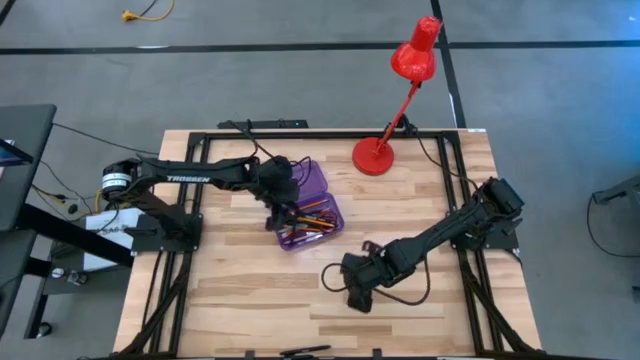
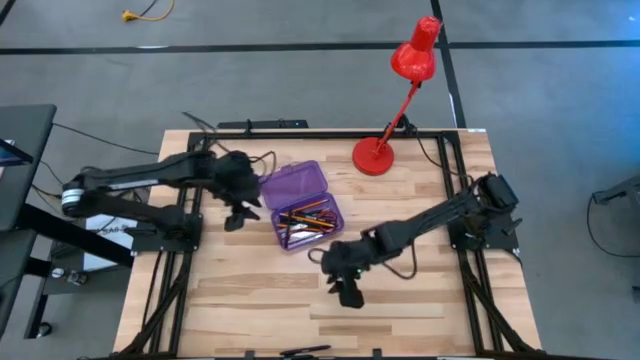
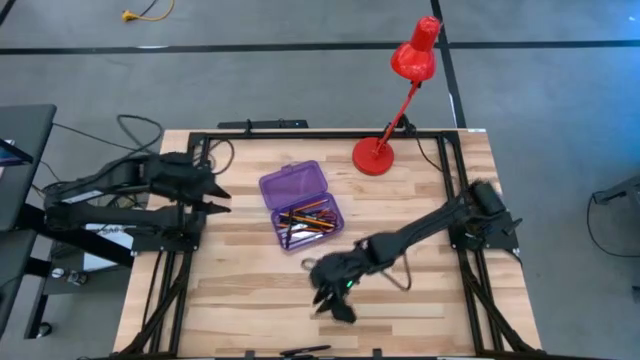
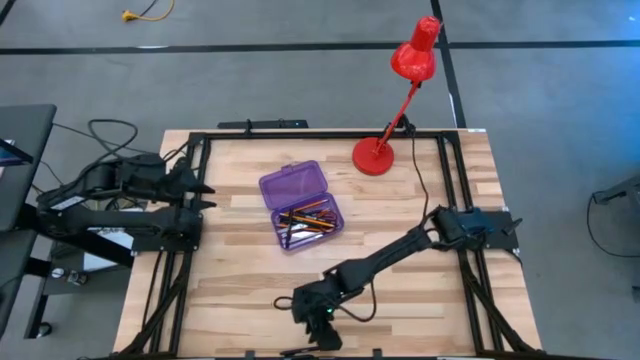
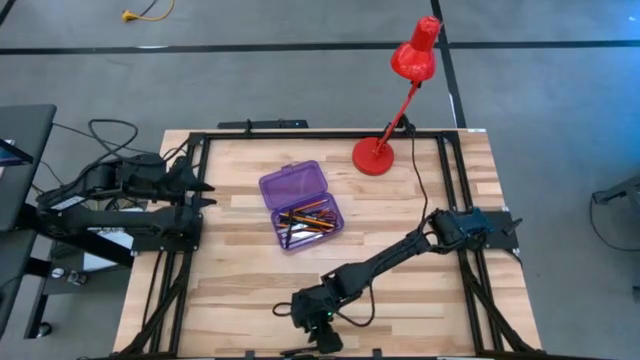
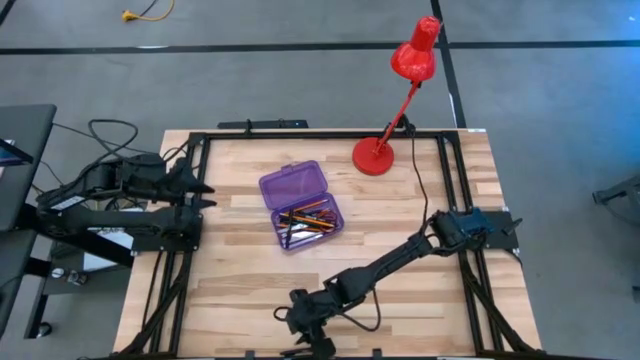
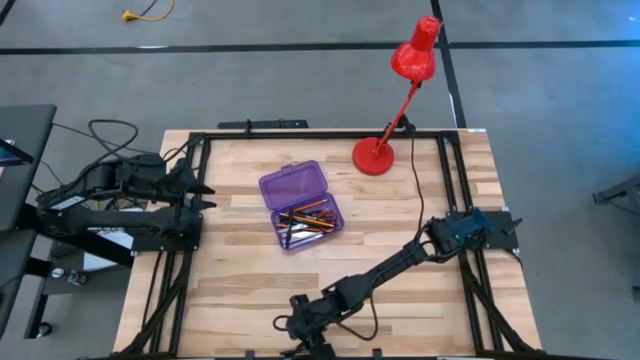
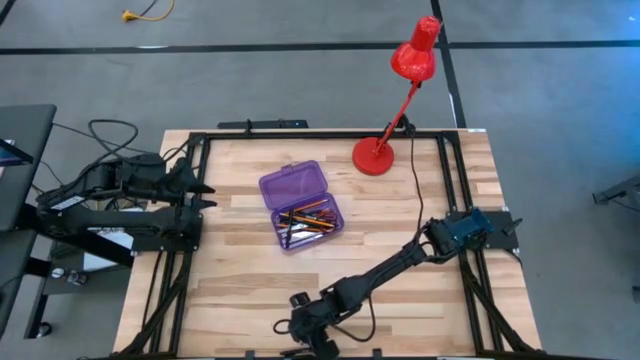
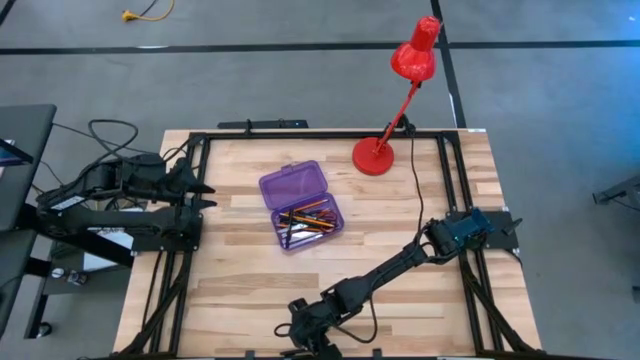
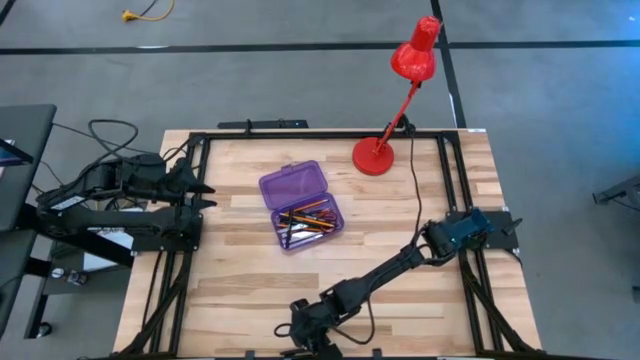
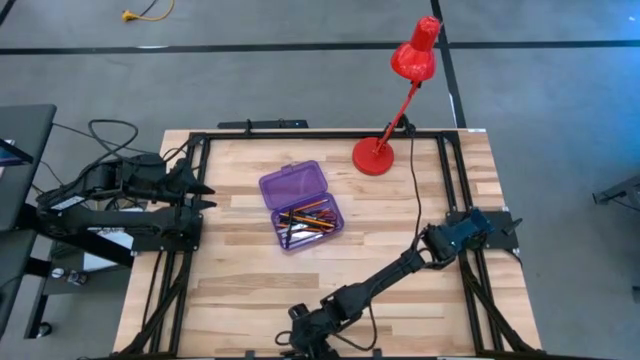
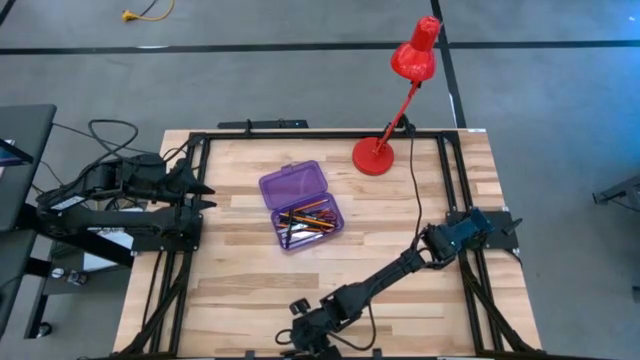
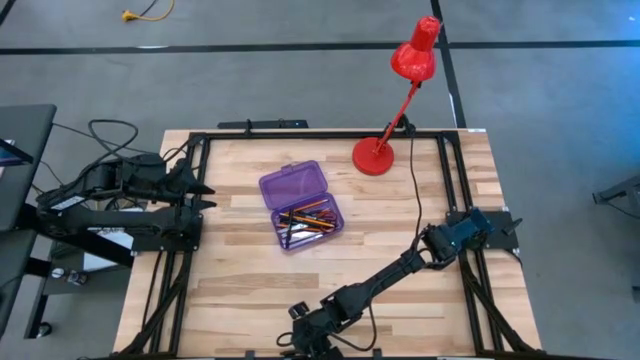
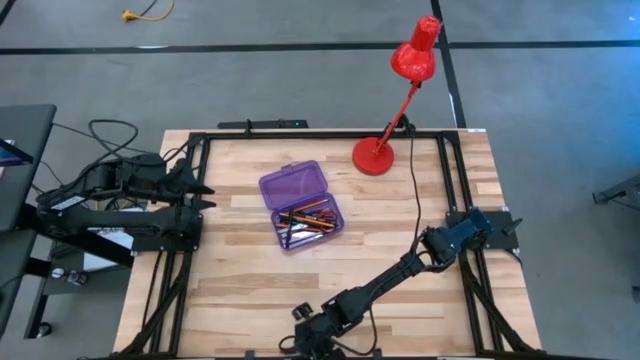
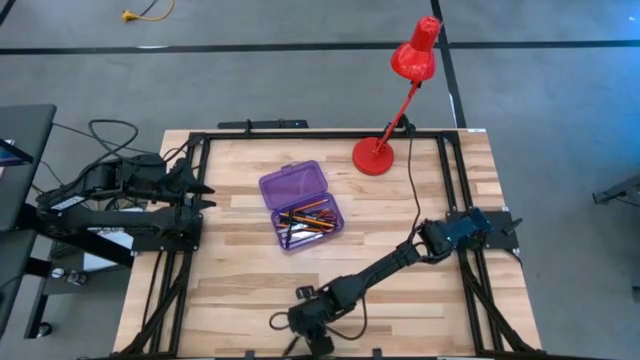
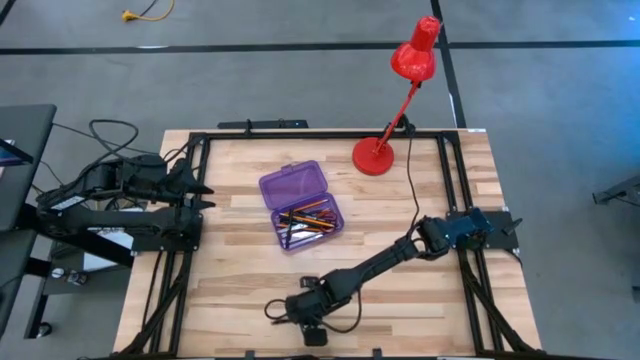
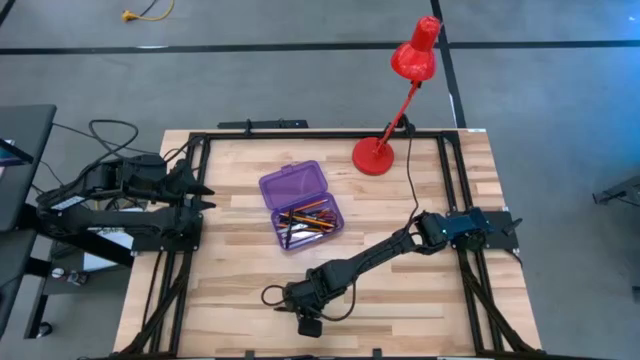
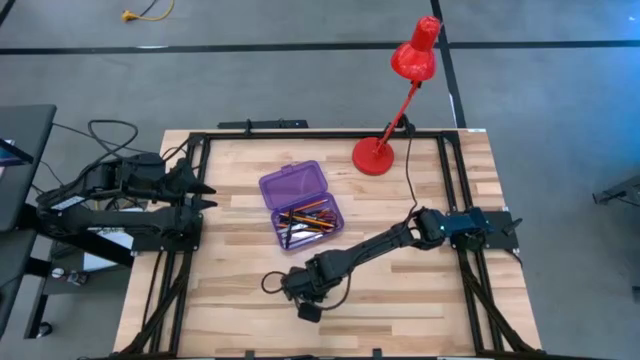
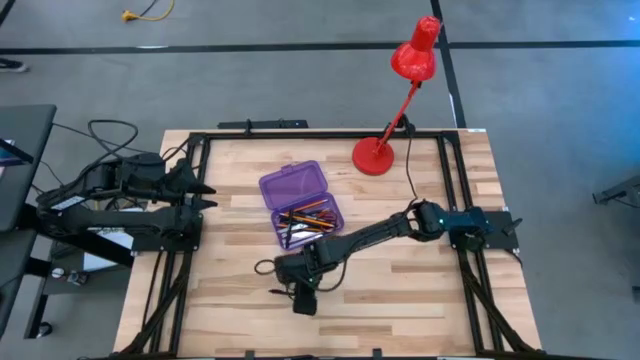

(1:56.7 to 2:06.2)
Task: Pick & place school supplies into a supply box
Put the black pen into the purple supply box

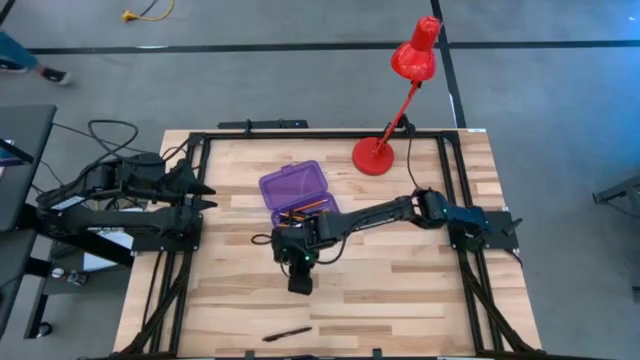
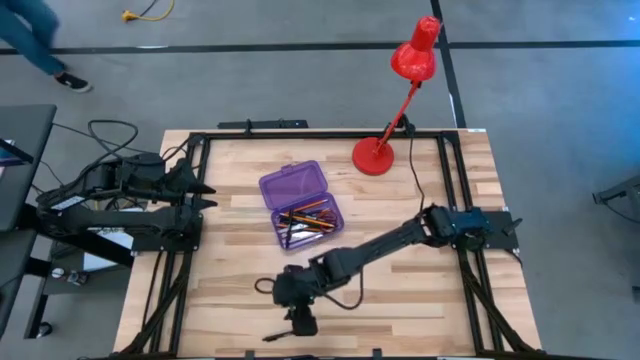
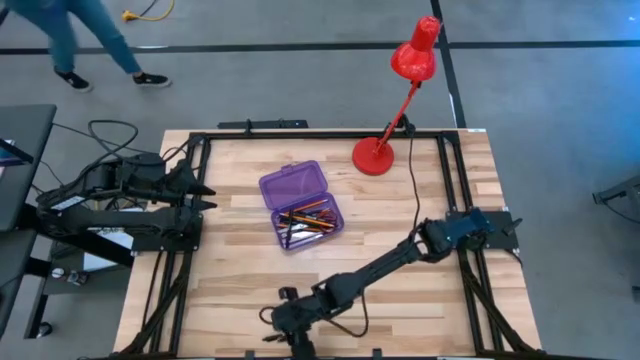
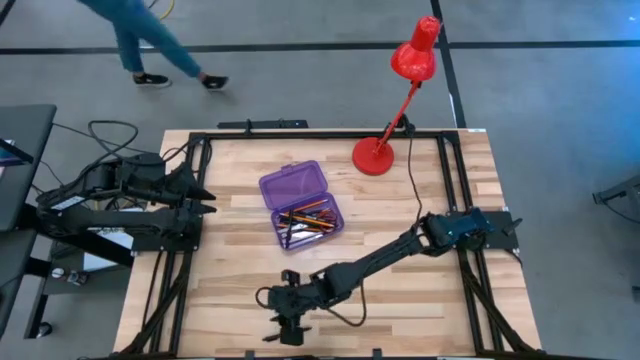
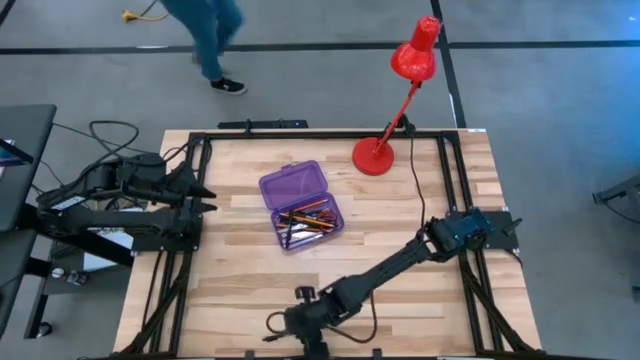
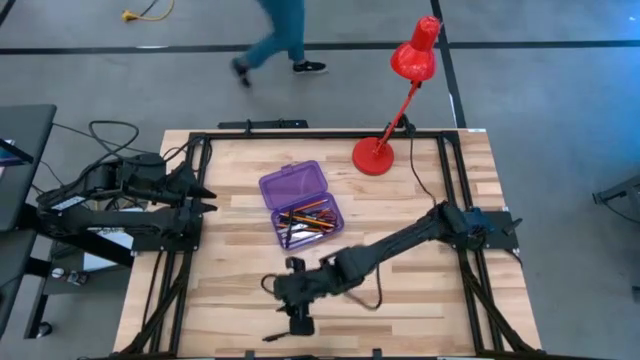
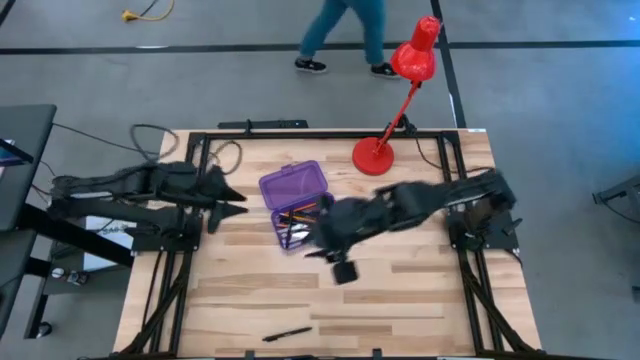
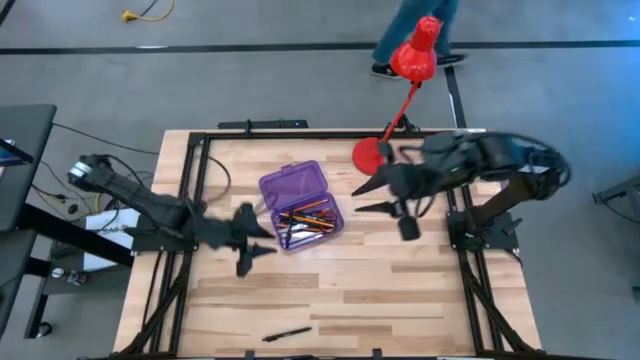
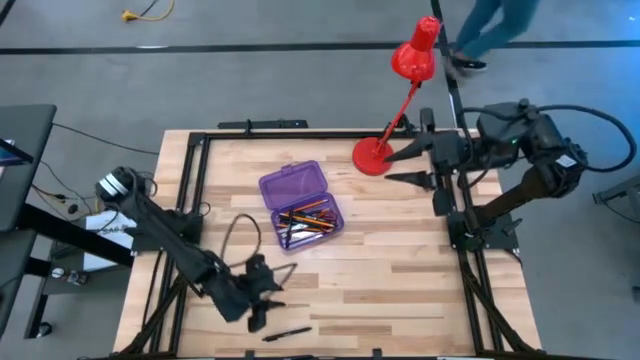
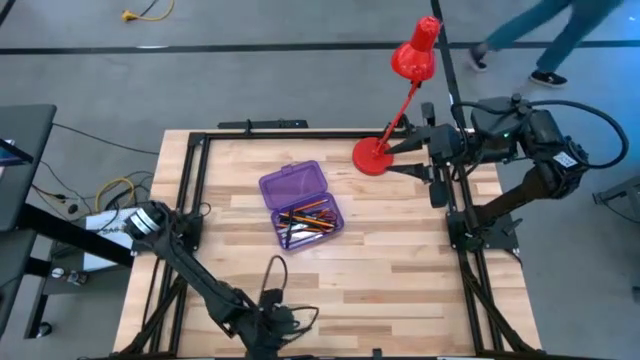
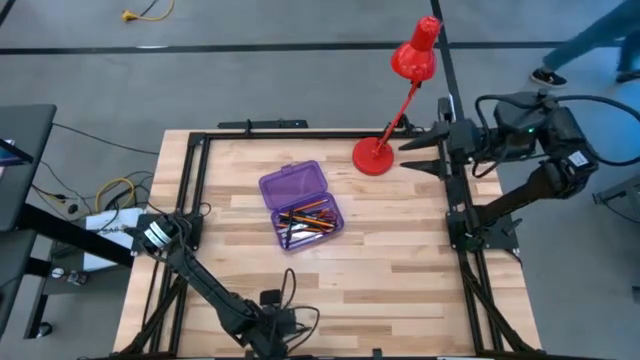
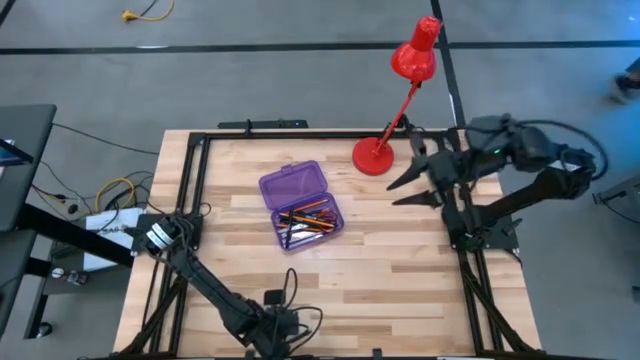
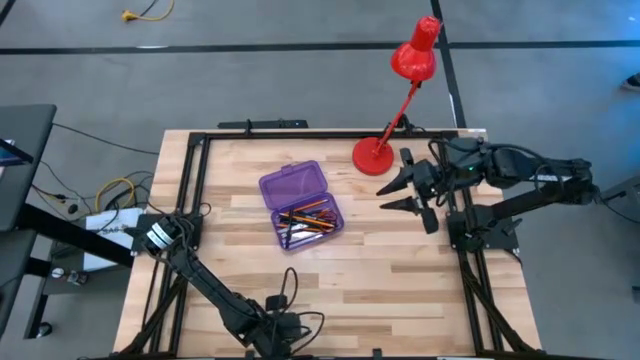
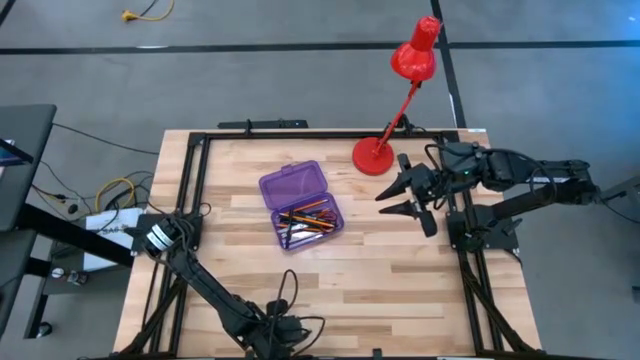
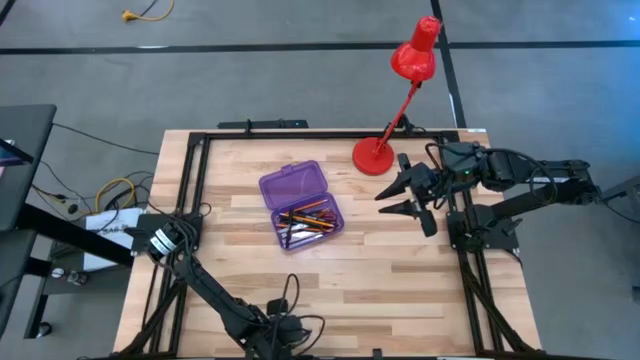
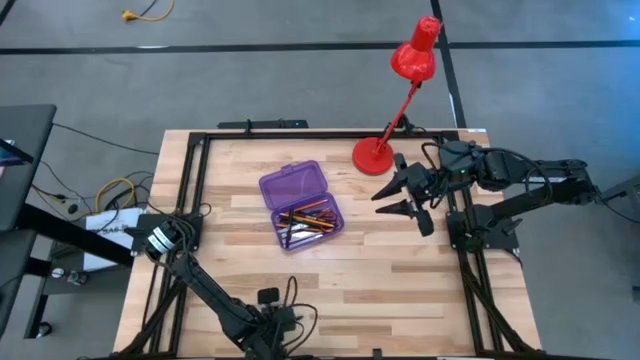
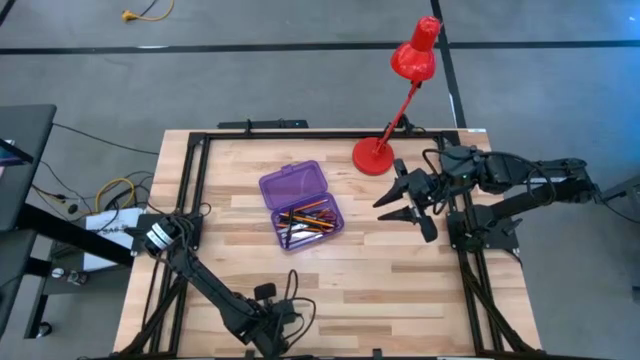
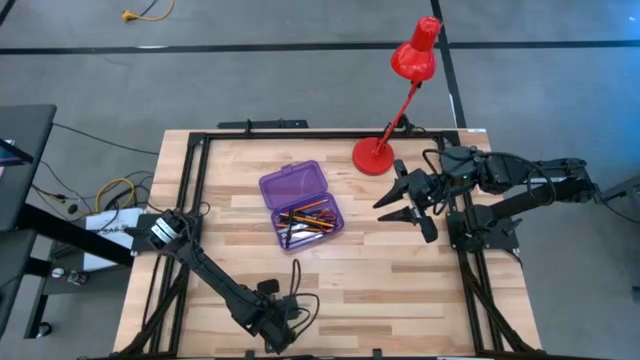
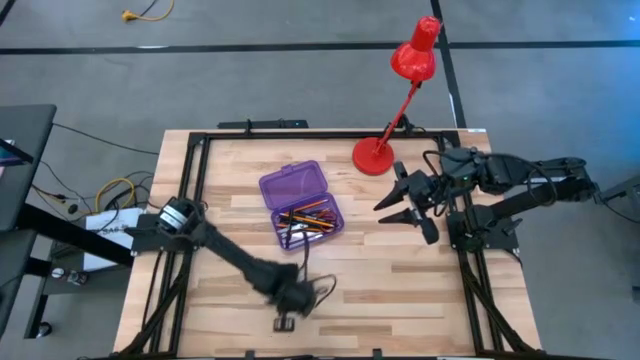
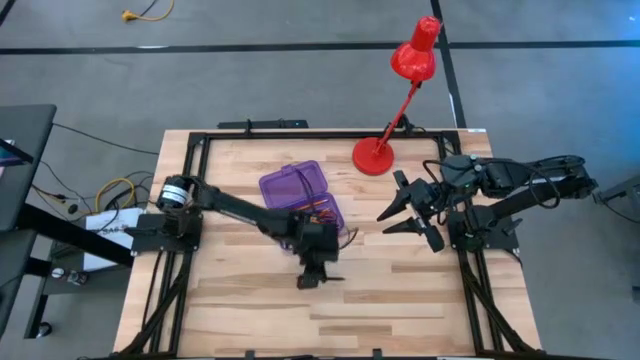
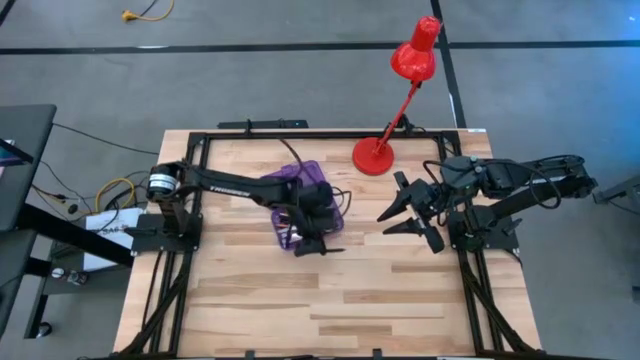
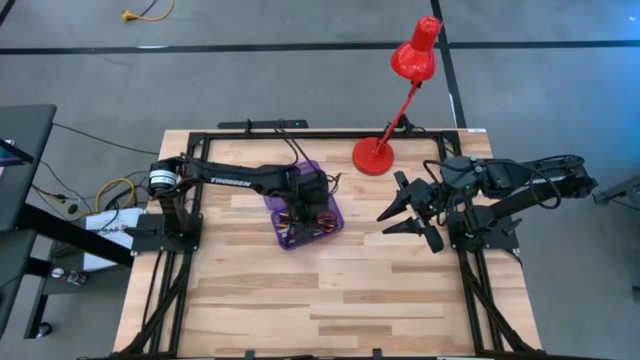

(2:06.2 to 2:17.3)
Put the black pen into the purple supply box

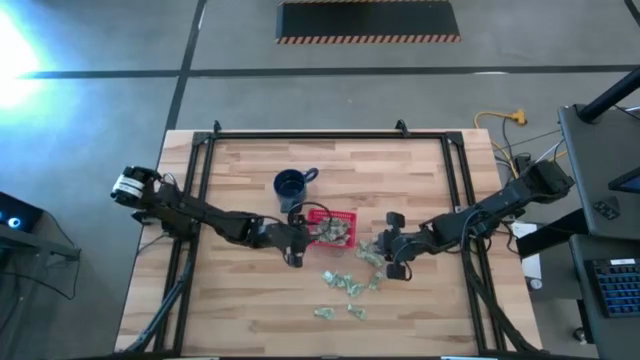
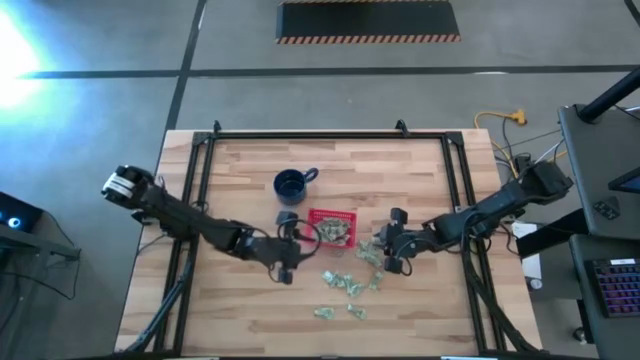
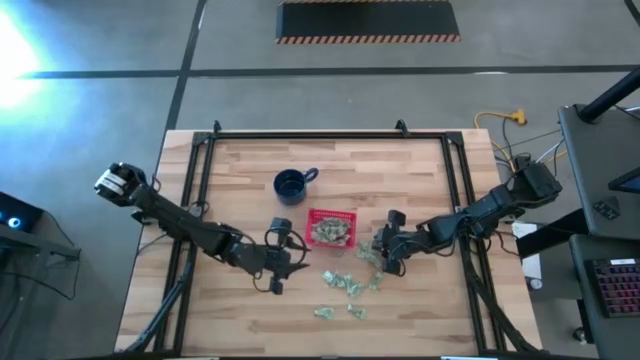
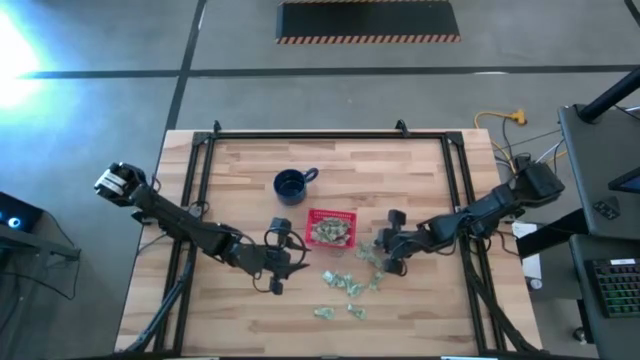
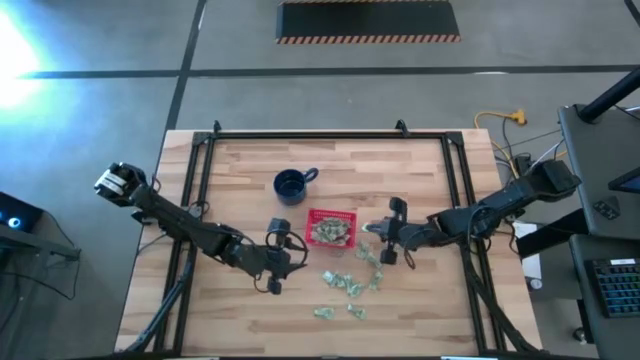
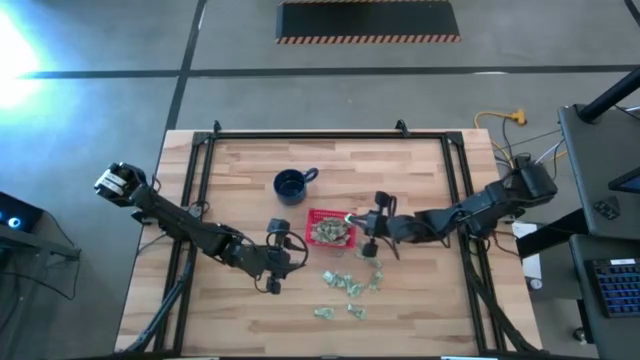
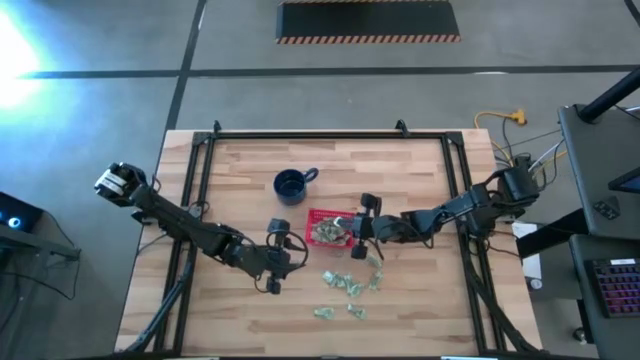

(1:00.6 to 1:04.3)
Task: Pick and place Stevia / Truvia into bins
Put the white stevia packet into the red basket
